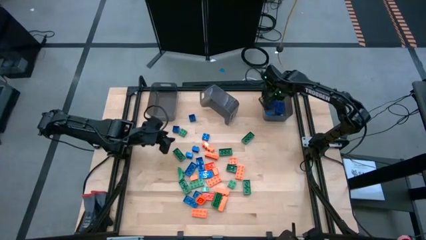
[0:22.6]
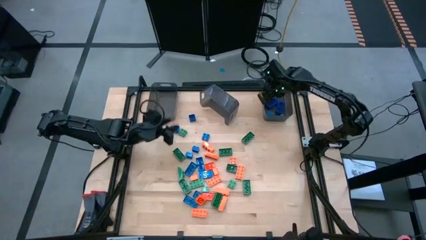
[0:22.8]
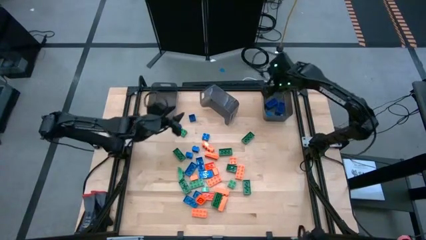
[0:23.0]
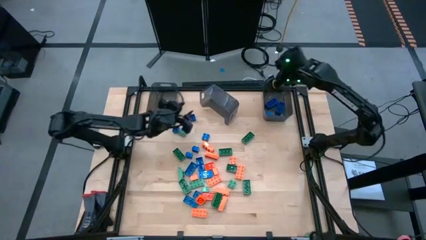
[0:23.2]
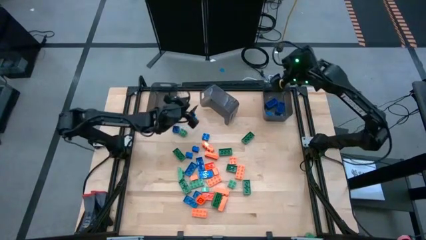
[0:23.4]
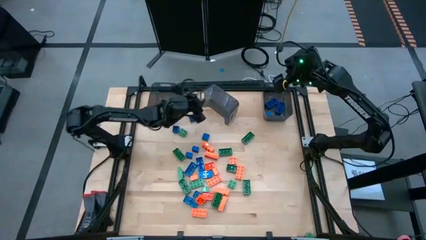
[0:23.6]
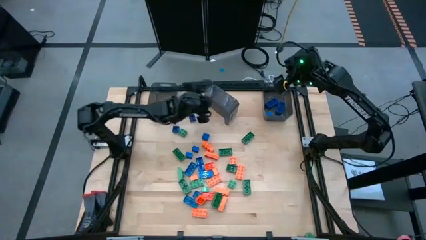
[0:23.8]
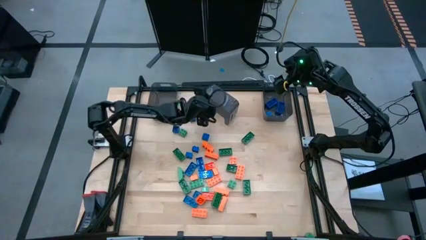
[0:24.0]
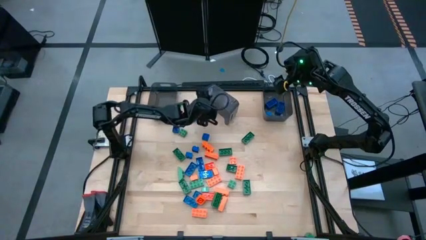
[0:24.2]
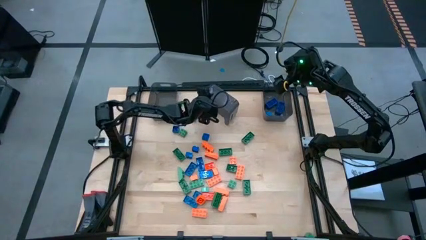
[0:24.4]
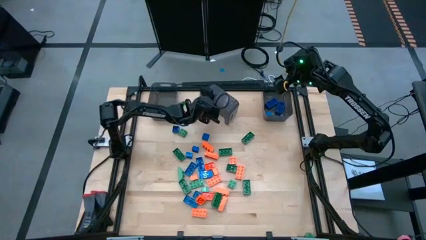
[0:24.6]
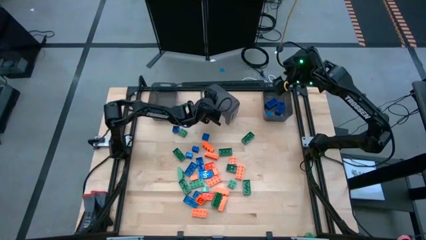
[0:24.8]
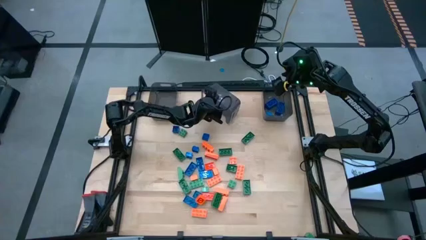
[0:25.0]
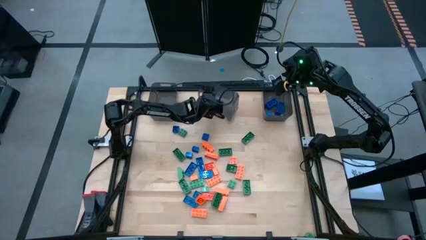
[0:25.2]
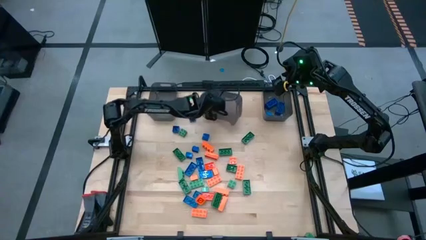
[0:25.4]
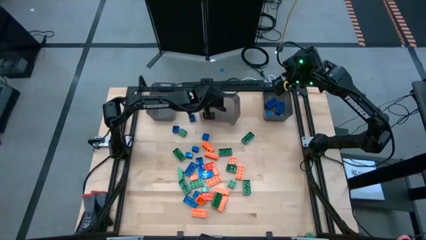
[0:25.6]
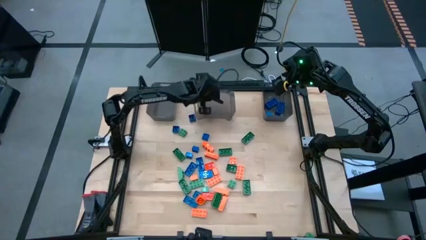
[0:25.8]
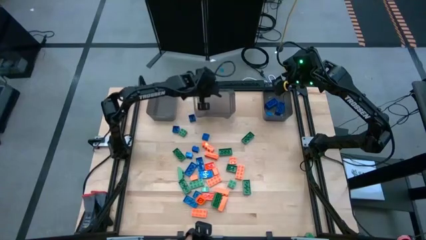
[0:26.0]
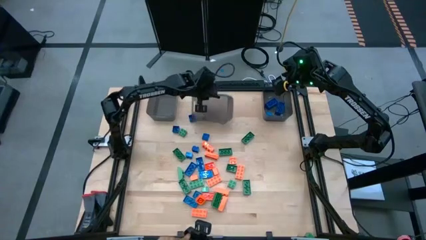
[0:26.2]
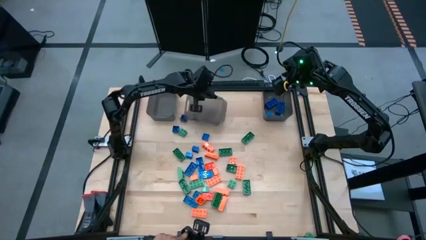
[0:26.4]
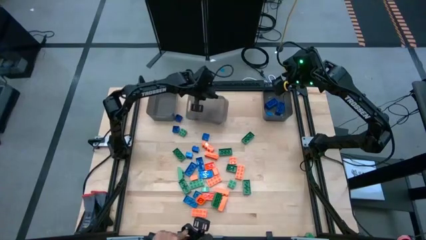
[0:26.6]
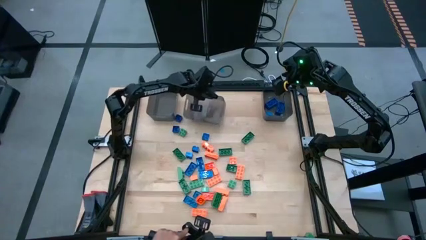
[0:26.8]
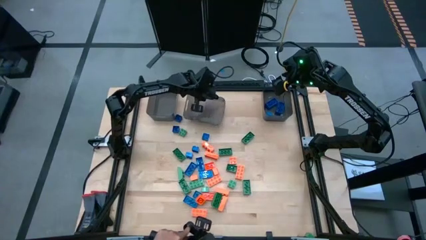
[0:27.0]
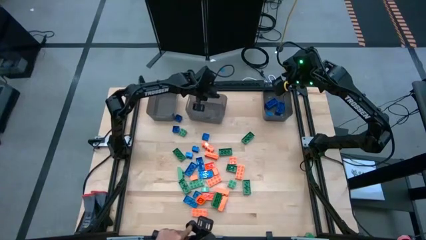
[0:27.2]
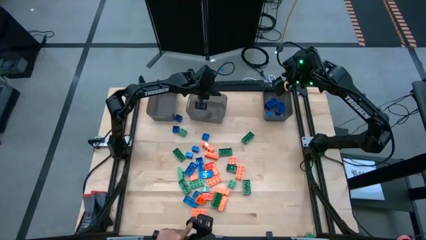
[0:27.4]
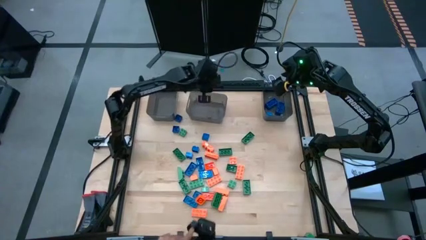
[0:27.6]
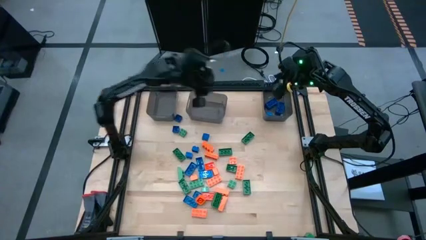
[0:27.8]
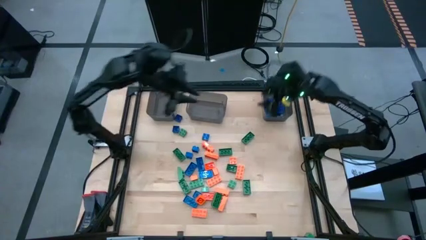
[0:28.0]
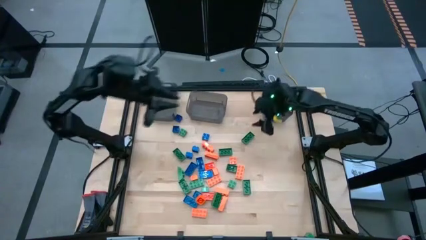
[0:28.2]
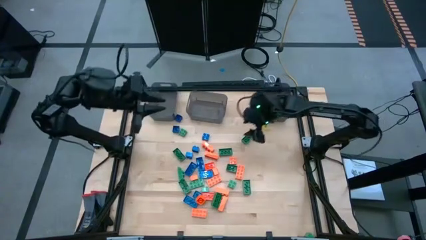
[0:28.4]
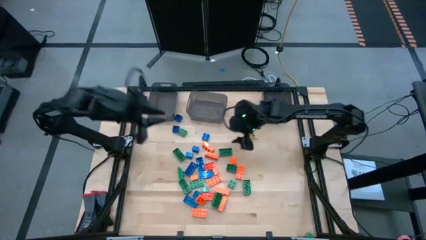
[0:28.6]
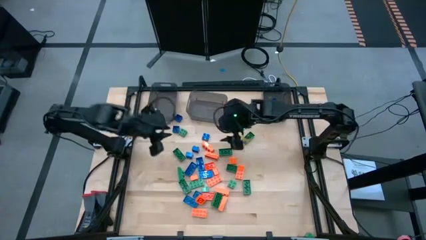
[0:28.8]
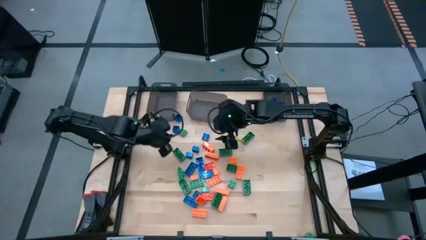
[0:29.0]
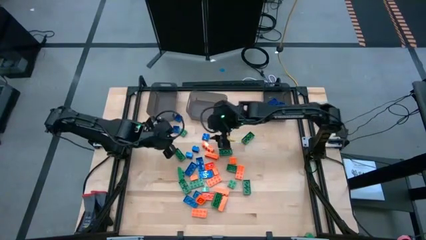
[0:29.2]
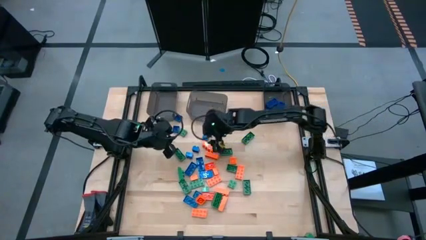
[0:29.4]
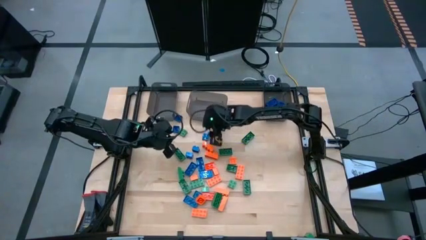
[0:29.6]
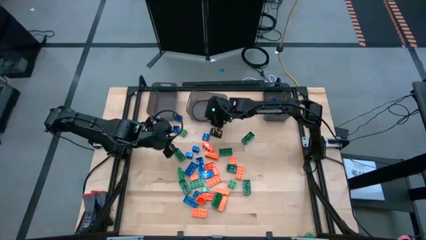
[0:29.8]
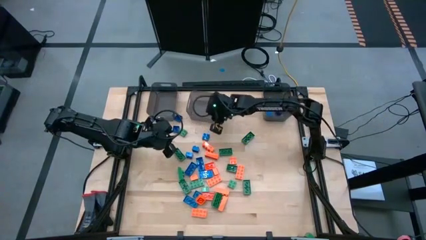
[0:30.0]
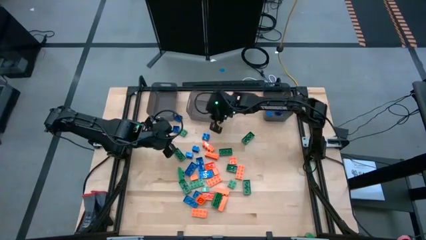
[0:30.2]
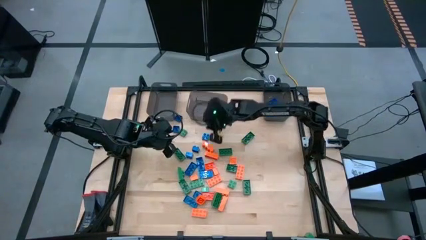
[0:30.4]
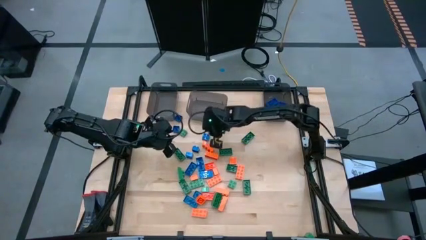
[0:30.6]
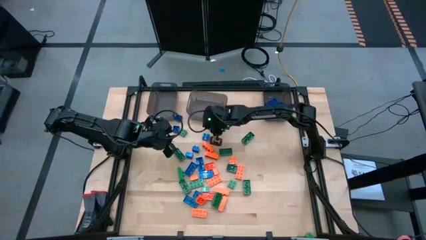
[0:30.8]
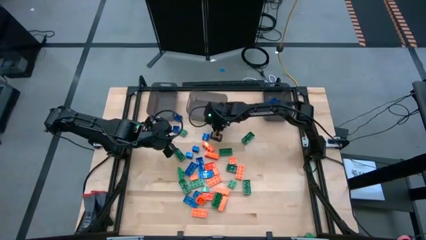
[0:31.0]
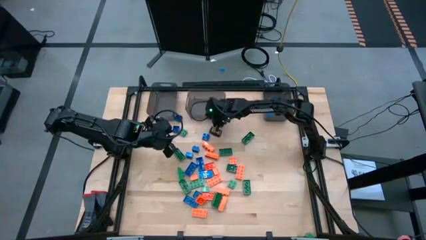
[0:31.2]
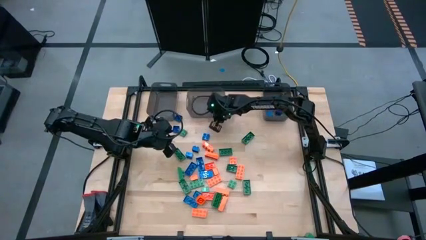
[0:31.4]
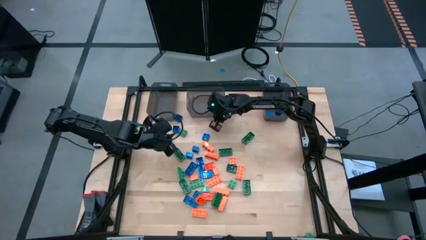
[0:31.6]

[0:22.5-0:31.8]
Task: Sort blocks
Adjust the middle black bin on the table

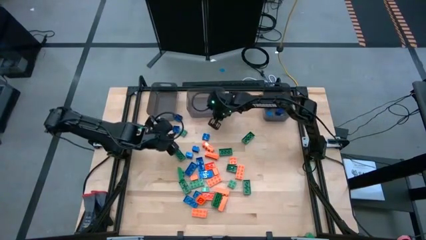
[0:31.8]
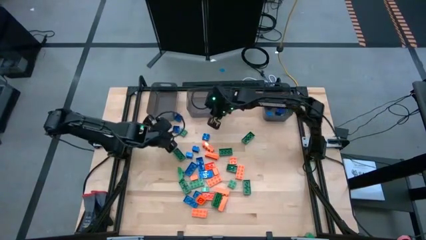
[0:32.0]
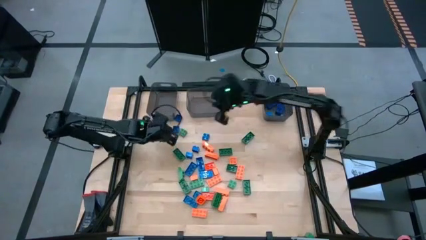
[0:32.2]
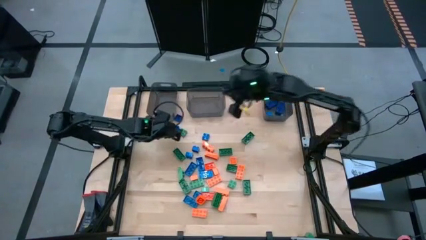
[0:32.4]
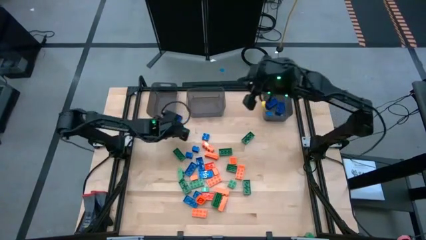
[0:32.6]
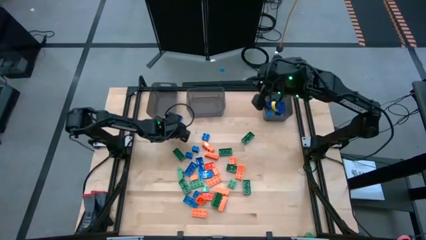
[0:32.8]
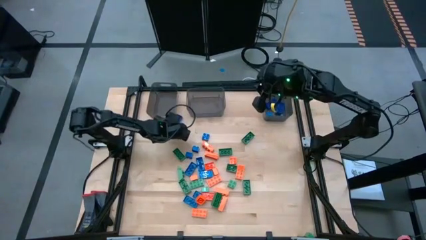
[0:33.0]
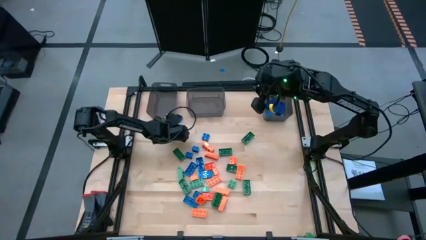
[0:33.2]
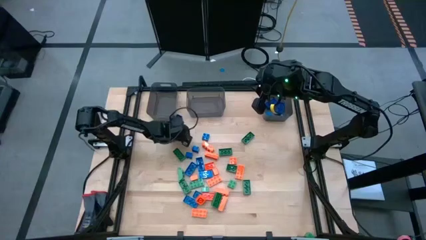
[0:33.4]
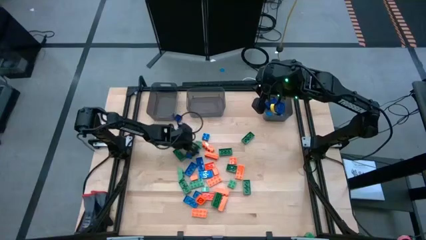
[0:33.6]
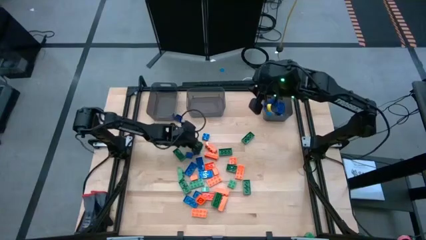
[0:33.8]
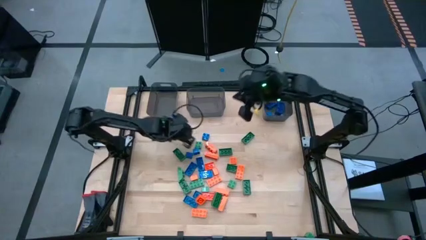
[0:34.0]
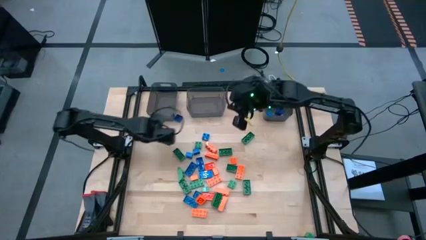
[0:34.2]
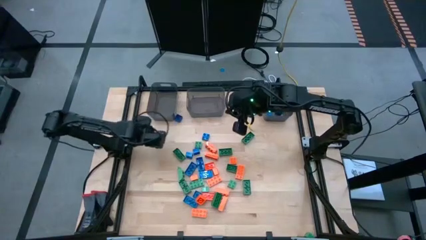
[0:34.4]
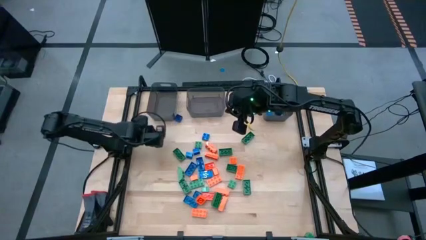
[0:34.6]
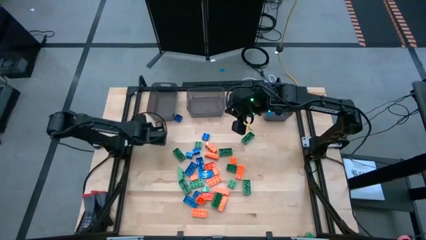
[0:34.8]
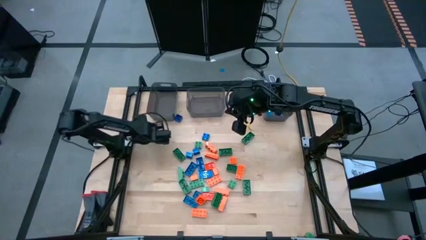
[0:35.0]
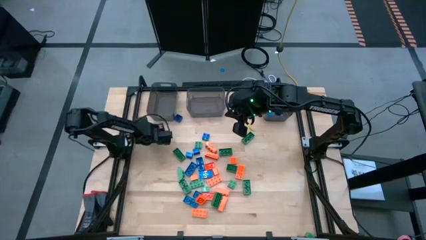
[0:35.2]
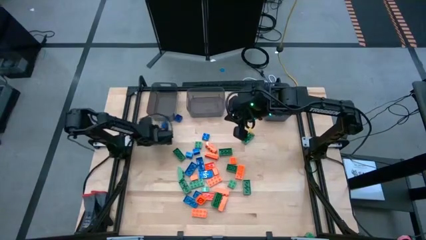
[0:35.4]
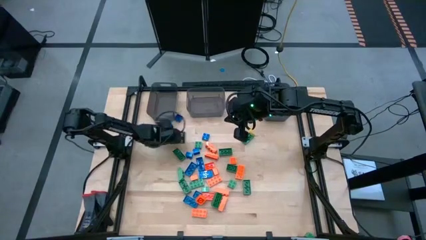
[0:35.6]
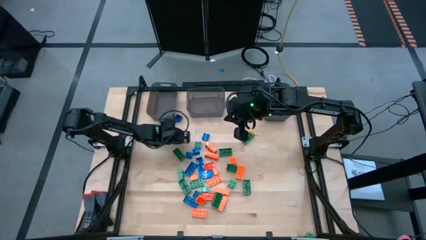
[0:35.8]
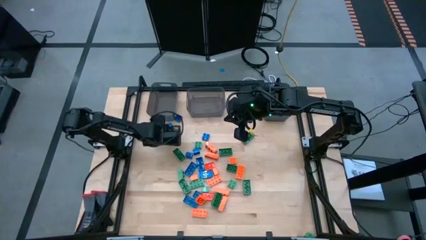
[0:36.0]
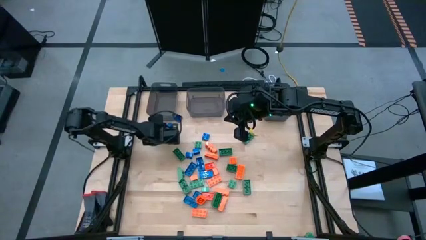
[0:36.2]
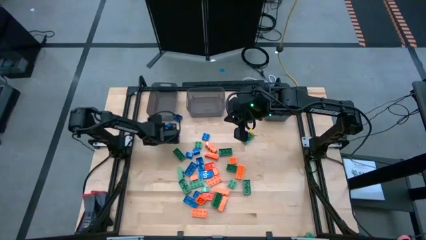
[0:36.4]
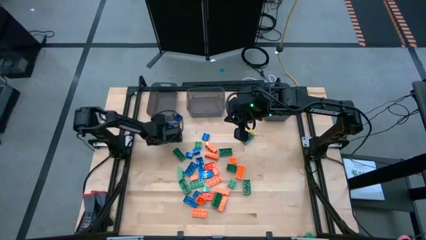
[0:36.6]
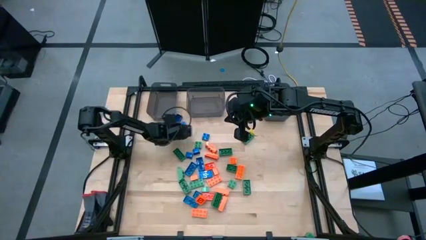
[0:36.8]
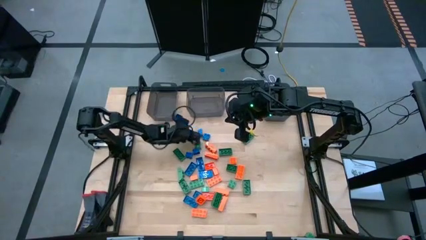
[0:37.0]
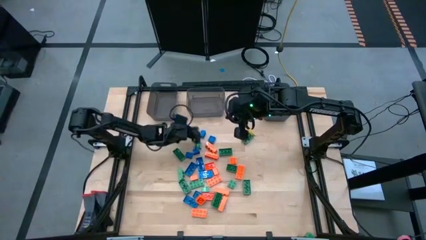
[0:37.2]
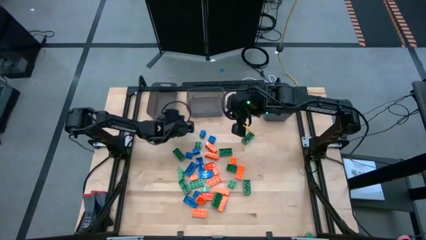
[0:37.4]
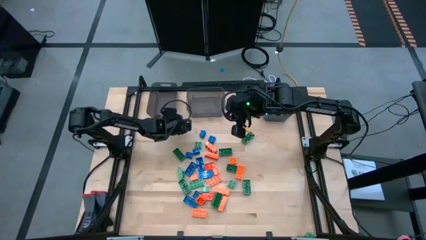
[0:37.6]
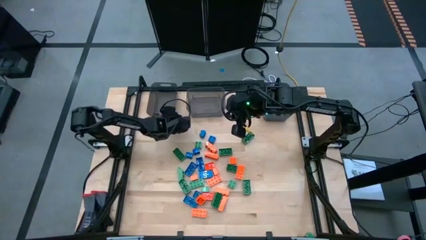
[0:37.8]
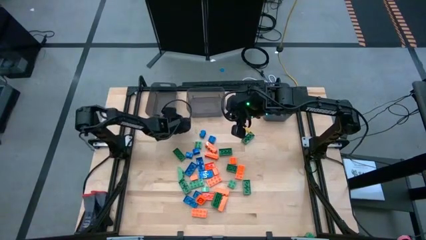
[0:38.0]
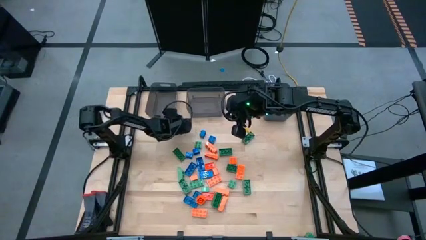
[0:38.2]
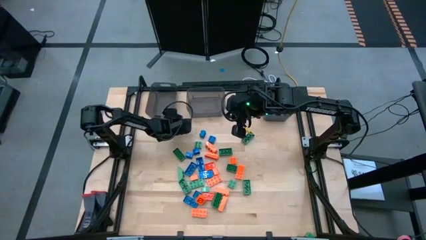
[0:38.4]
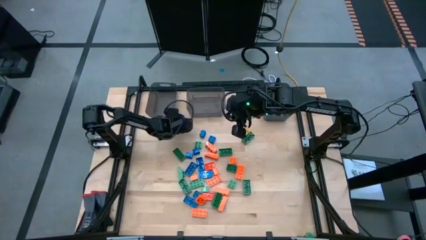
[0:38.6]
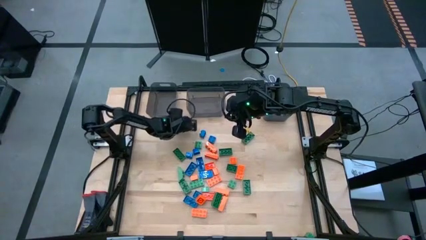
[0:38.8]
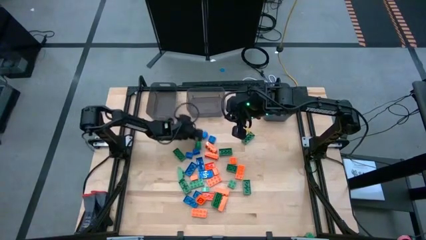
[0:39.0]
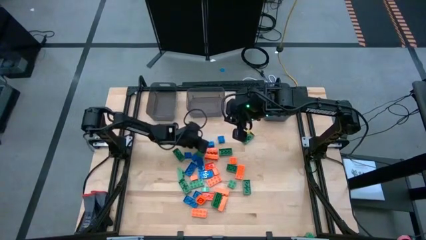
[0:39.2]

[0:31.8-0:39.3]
Adjust the game pieces on the table
